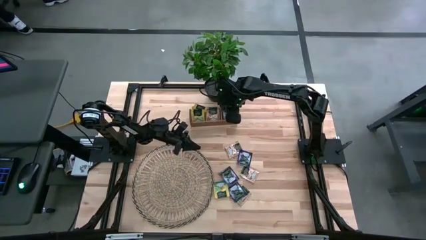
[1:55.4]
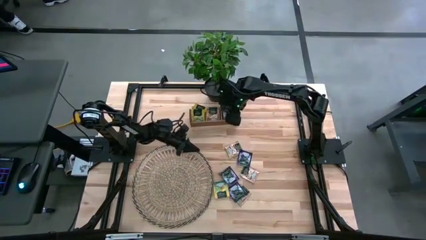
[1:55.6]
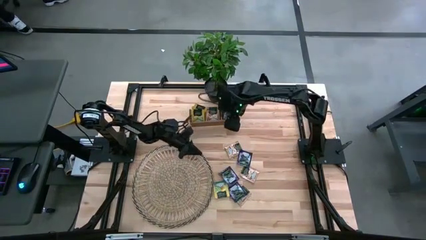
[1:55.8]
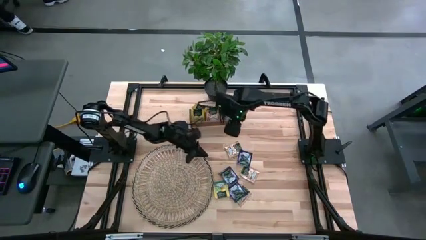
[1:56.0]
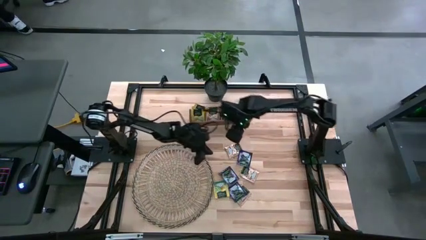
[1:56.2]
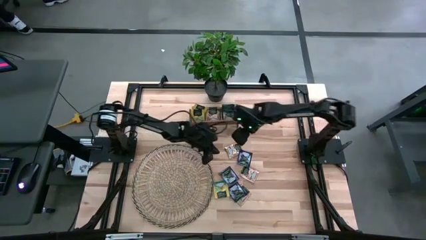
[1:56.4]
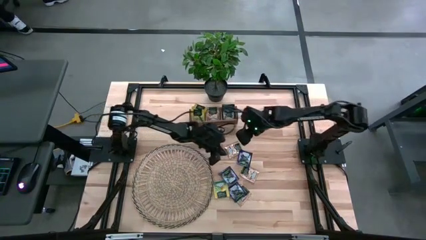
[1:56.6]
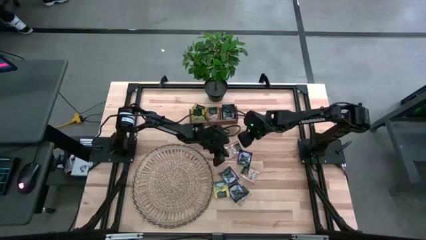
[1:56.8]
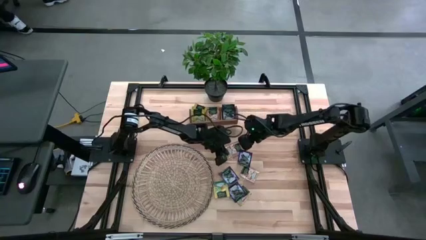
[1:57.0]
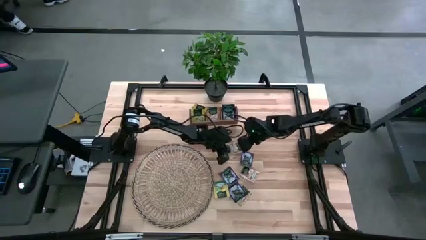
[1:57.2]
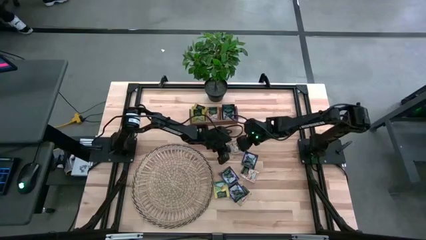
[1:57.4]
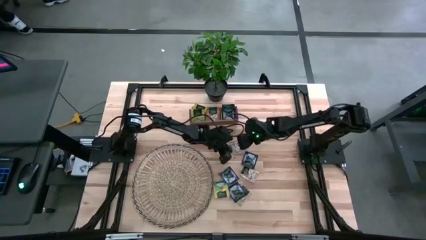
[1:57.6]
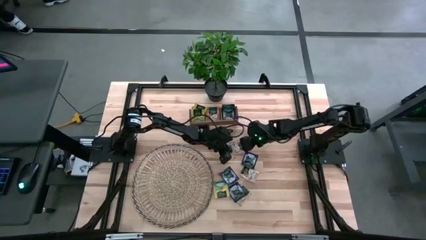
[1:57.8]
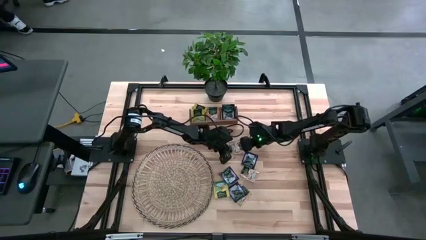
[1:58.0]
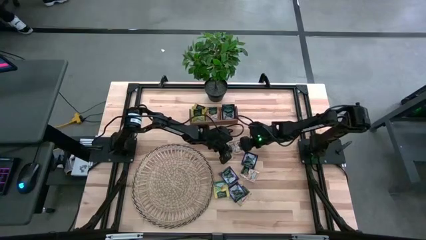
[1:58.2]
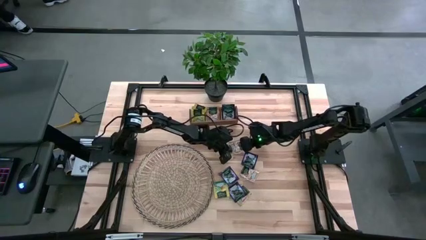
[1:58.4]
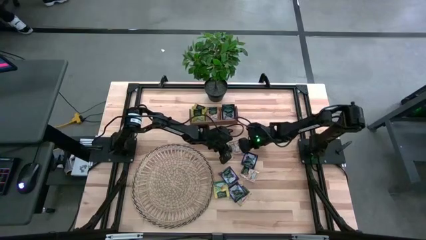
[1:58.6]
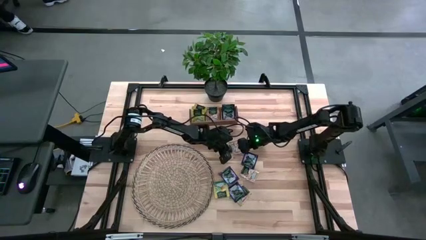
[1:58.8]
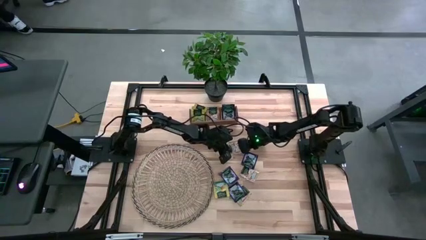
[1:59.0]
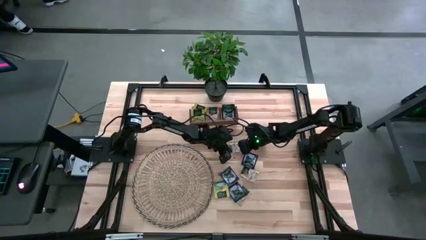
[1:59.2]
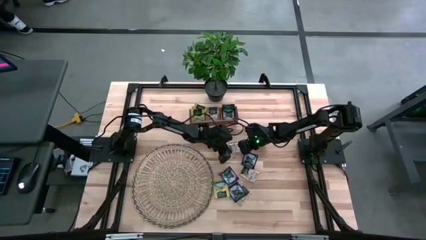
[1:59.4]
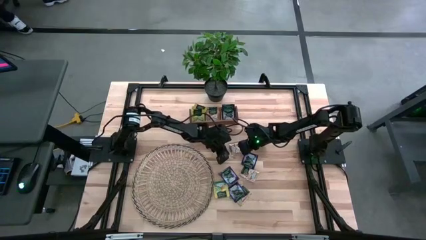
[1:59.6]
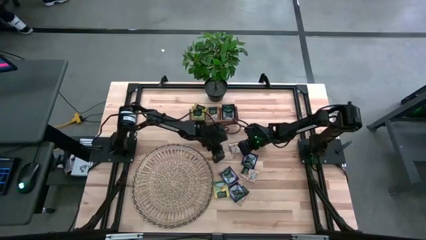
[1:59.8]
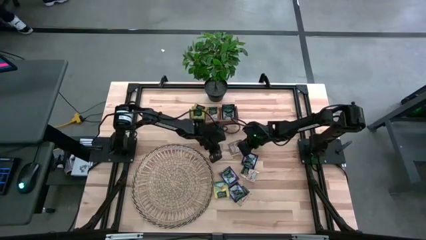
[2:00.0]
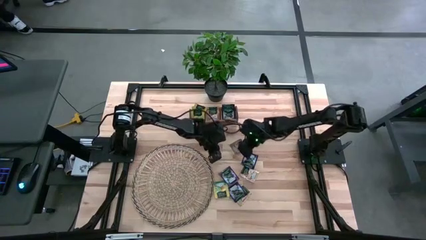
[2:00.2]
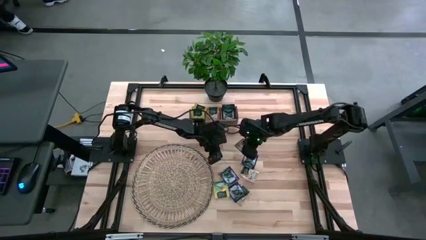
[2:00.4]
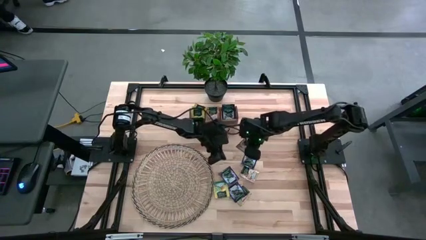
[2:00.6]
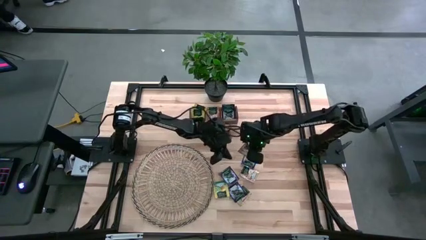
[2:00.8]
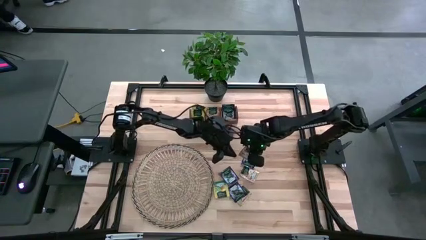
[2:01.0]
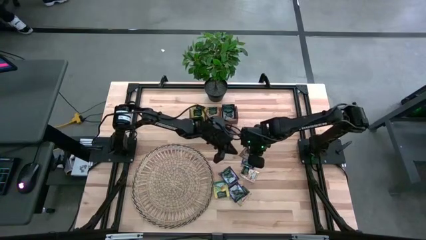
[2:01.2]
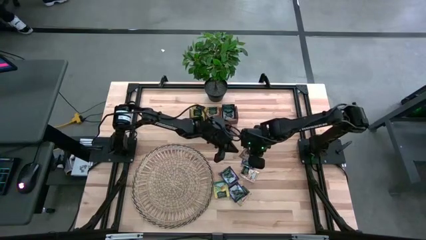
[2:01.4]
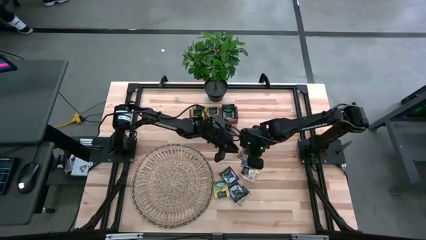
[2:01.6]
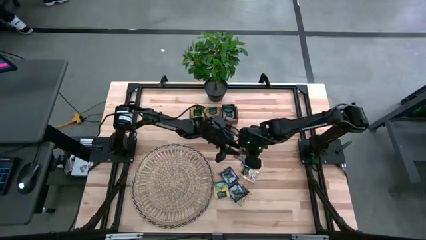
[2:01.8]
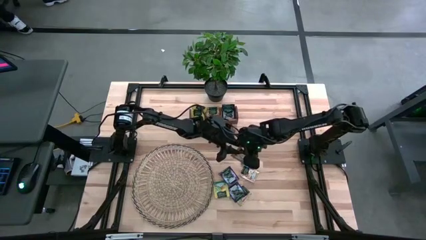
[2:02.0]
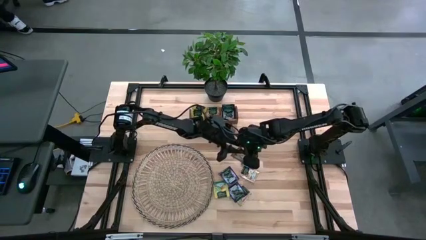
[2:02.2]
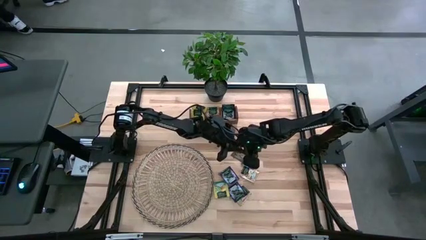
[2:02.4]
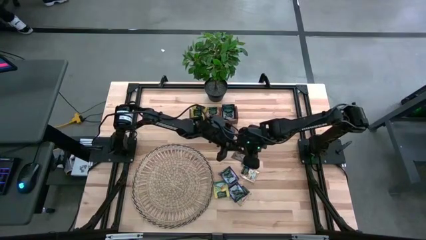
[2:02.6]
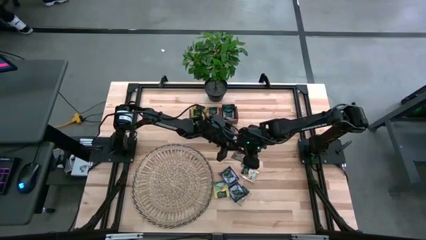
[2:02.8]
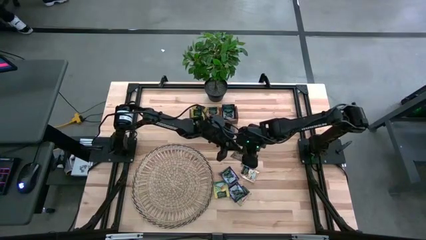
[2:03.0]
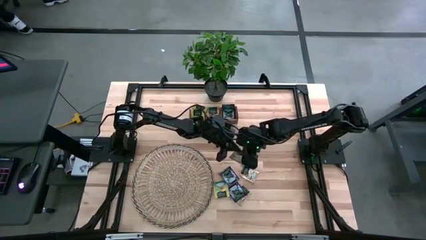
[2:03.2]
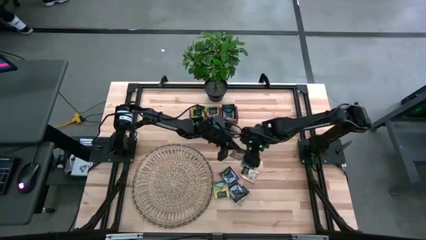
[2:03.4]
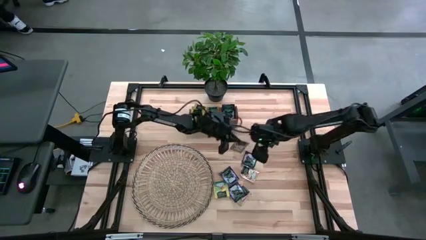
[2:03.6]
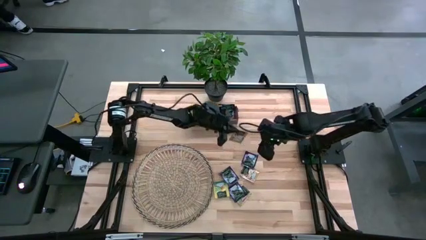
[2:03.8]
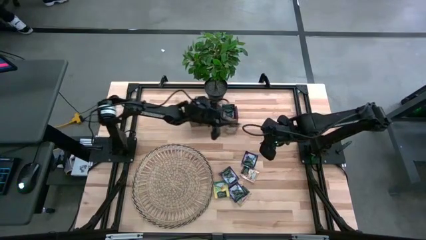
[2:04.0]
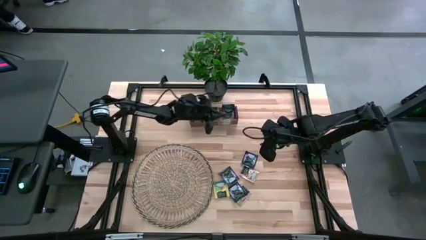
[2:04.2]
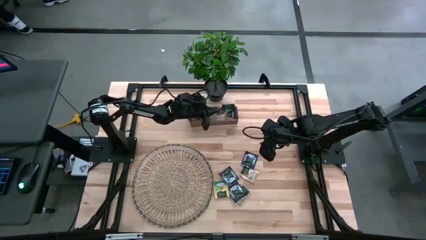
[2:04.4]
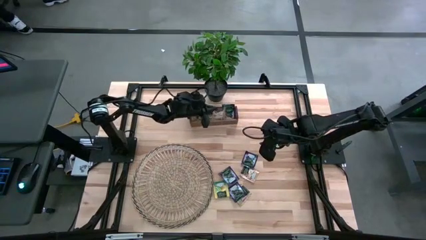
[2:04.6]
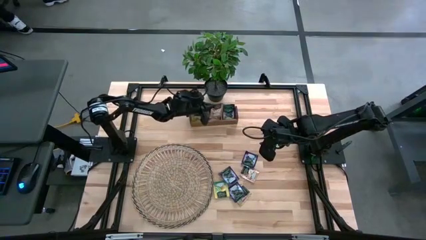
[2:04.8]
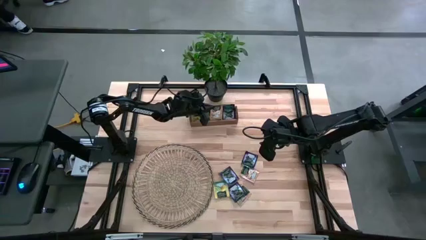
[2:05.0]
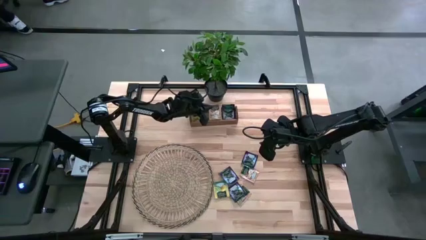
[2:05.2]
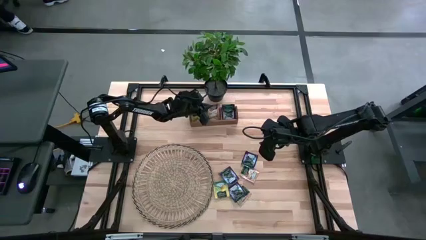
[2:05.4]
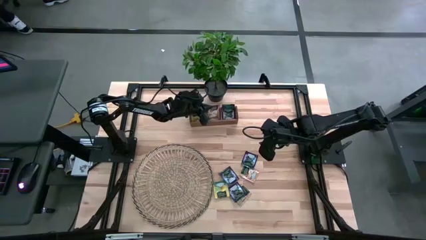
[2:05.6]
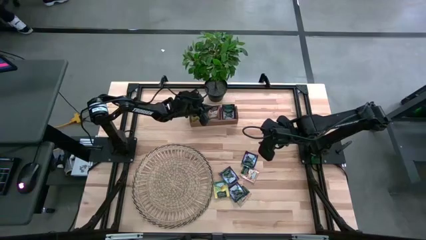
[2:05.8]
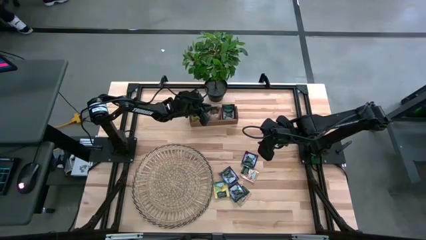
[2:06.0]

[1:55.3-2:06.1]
Task: Pick & Place Tea
Put the brown tea bag into the middle section of the wooden organizer

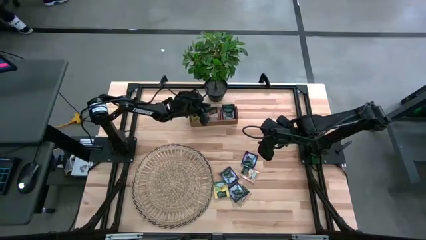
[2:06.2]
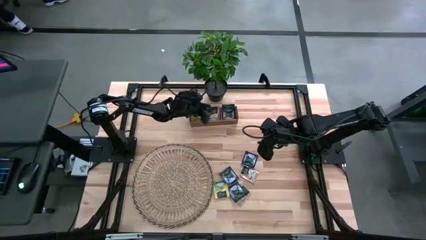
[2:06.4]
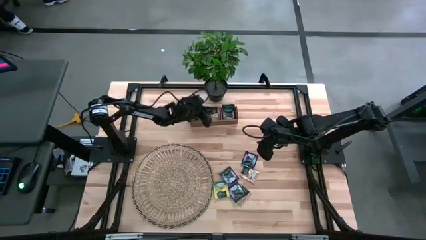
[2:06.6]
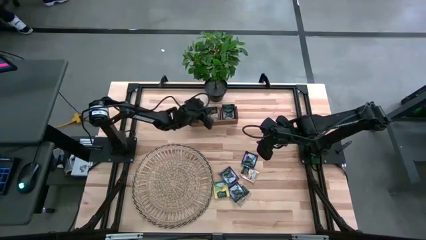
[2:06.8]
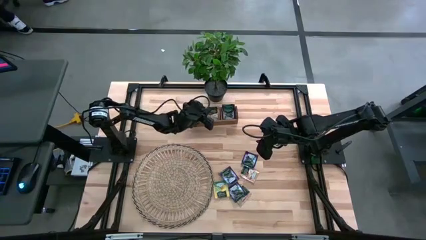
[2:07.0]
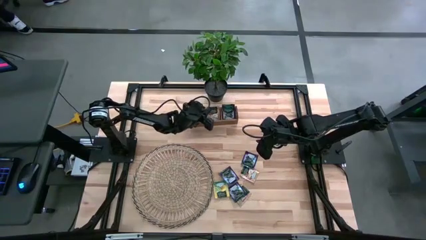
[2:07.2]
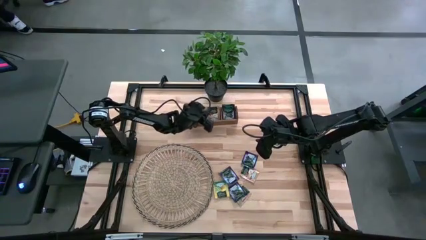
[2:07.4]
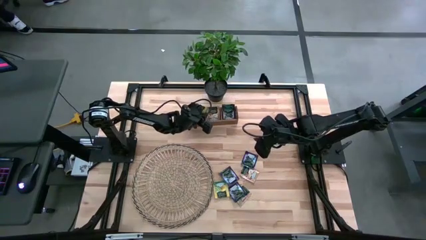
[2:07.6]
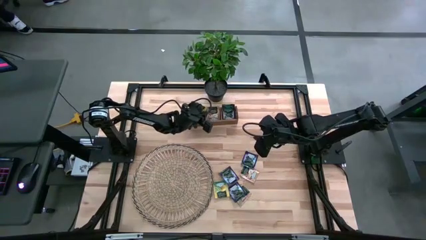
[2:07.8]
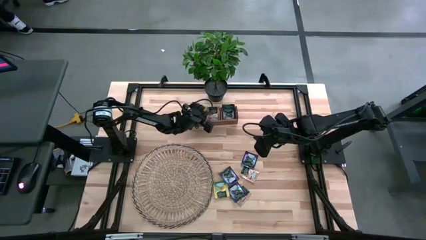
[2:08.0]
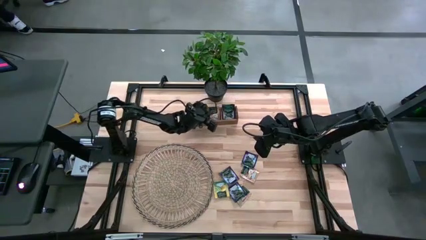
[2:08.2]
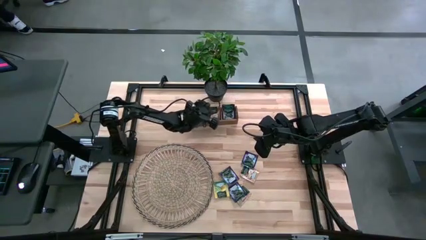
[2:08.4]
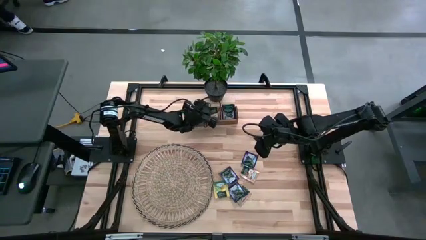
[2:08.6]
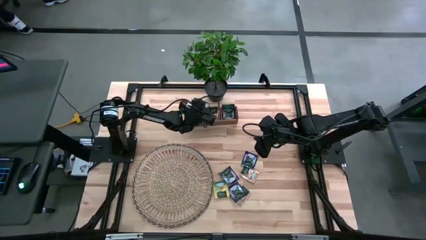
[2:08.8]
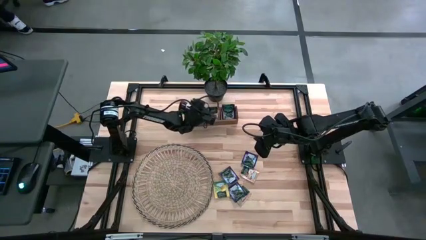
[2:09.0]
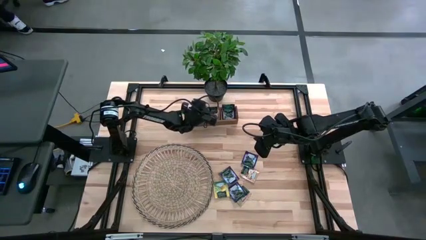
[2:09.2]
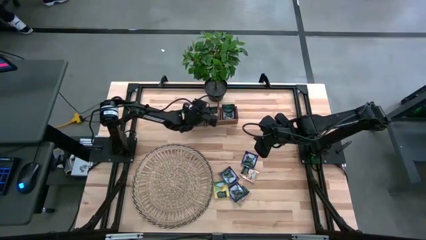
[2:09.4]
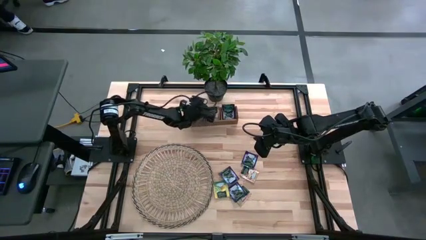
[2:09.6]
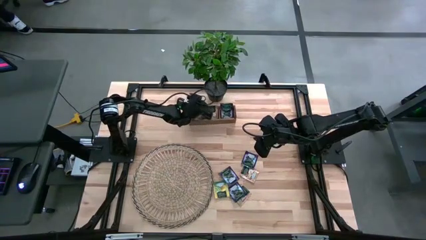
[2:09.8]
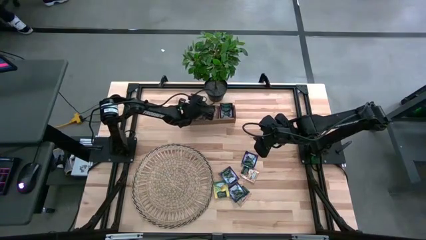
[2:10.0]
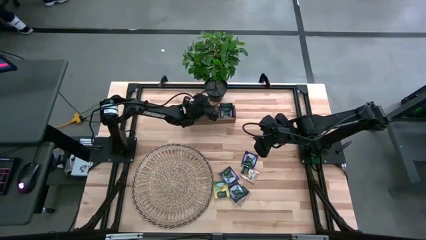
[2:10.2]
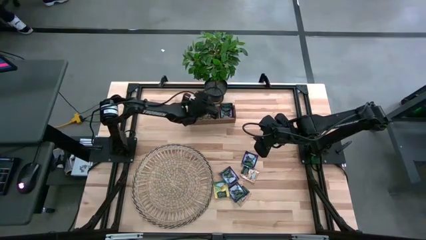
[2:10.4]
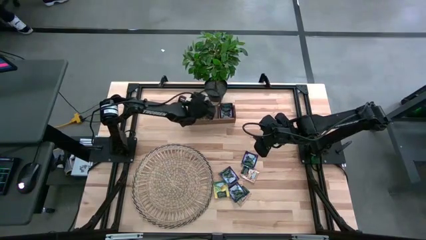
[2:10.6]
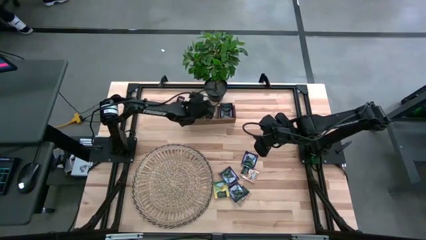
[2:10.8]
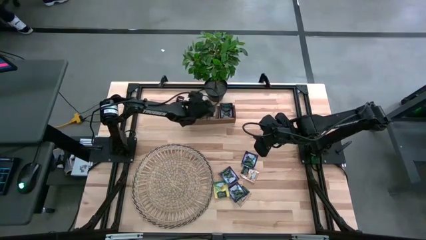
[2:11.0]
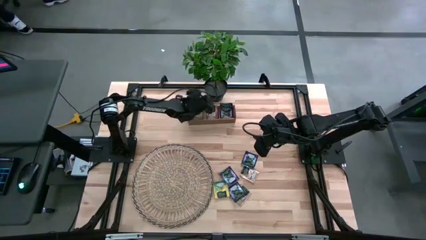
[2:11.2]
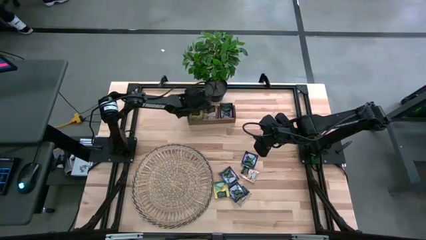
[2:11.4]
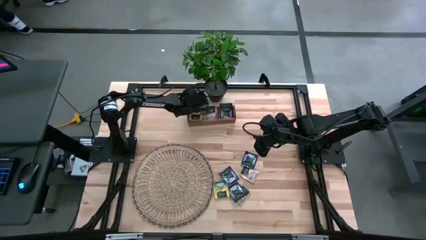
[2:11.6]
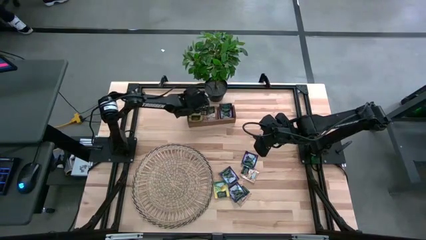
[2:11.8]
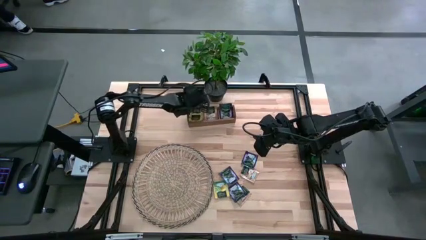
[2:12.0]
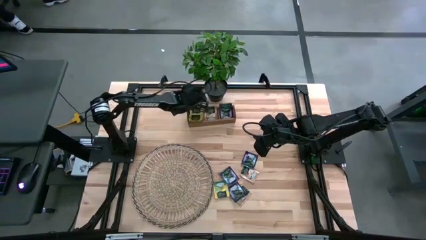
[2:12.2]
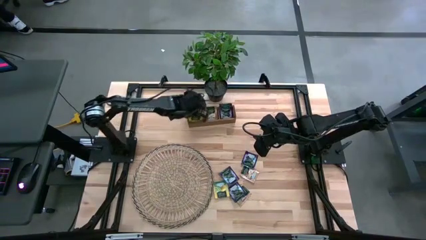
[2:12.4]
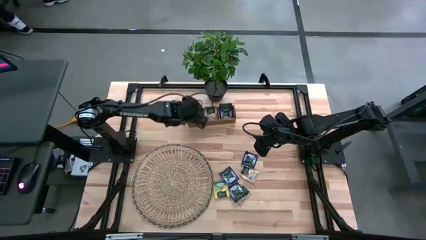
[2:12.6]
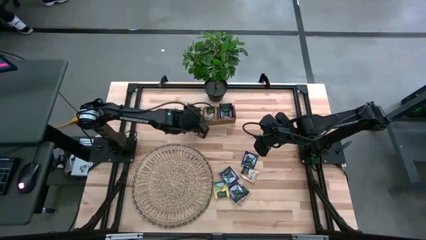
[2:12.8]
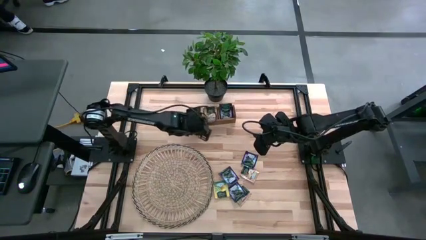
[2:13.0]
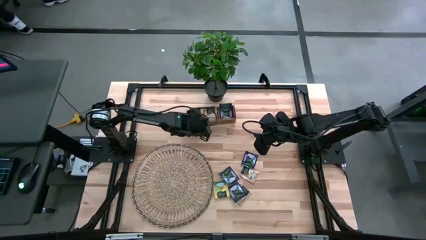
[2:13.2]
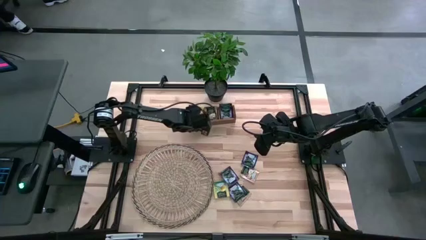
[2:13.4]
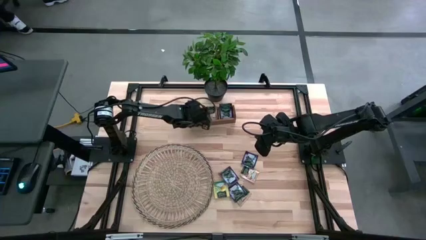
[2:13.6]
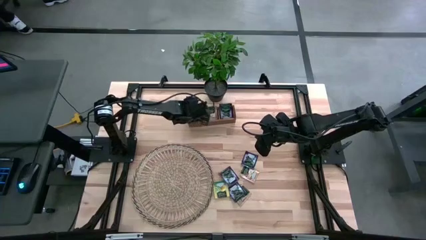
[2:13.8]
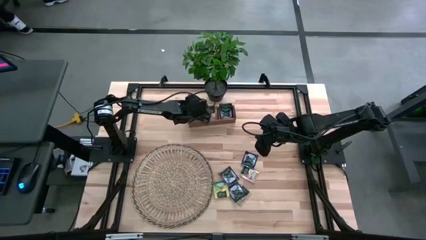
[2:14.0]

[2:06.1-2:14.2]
Adjust the yellow tea bag in the wooden organizer
